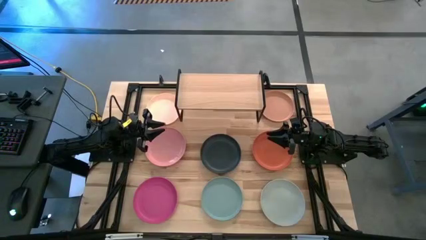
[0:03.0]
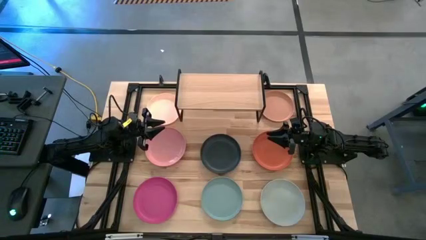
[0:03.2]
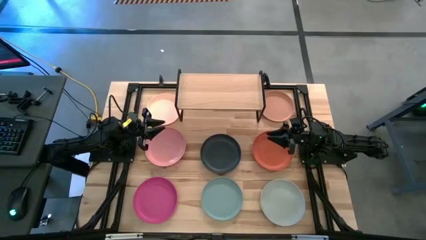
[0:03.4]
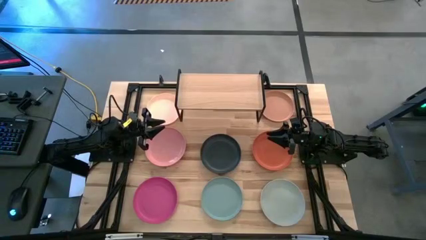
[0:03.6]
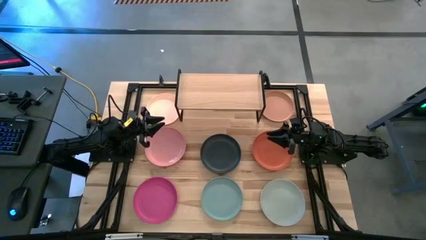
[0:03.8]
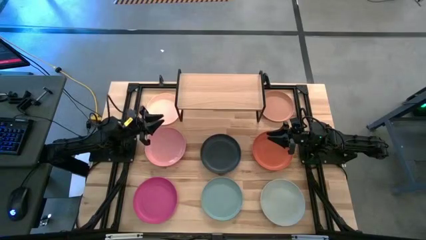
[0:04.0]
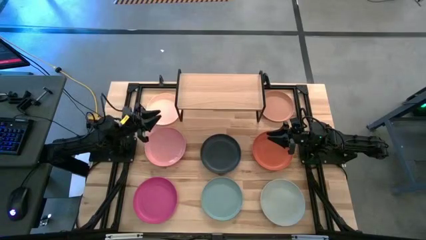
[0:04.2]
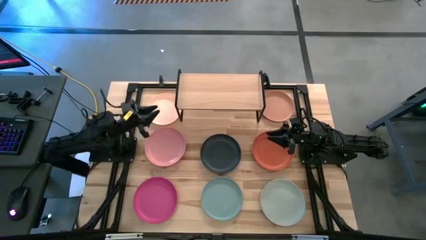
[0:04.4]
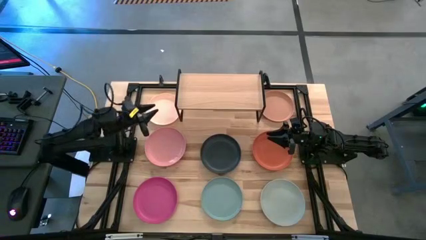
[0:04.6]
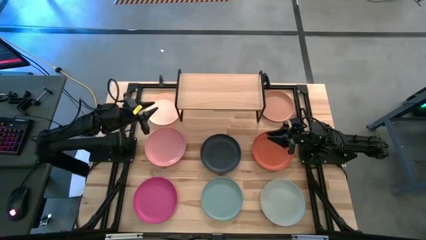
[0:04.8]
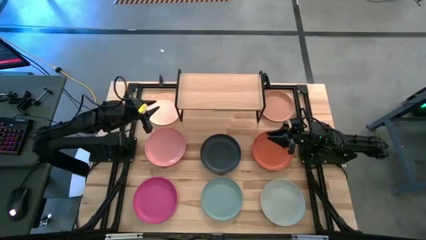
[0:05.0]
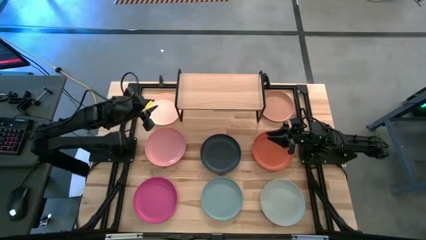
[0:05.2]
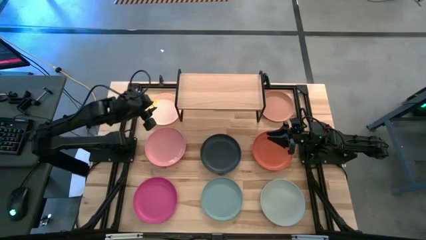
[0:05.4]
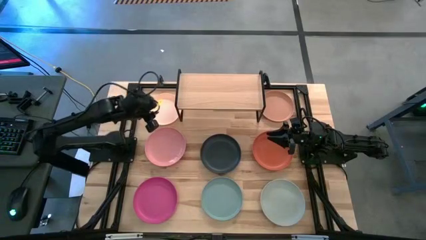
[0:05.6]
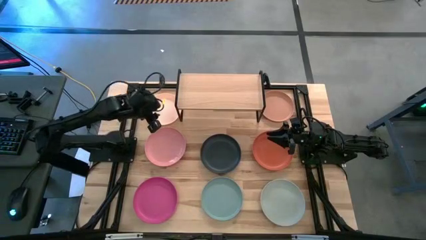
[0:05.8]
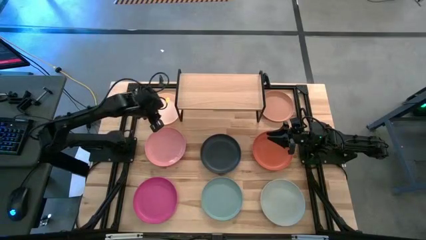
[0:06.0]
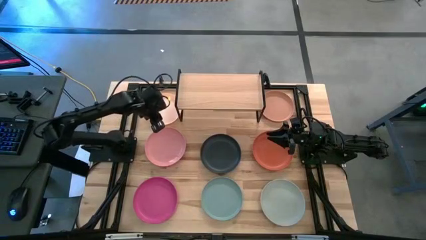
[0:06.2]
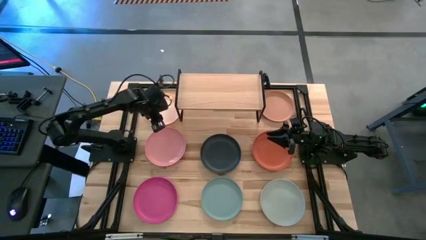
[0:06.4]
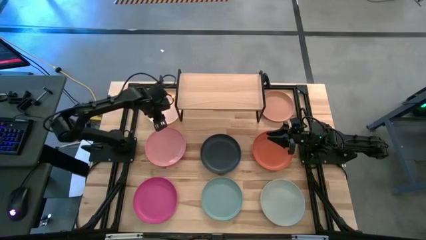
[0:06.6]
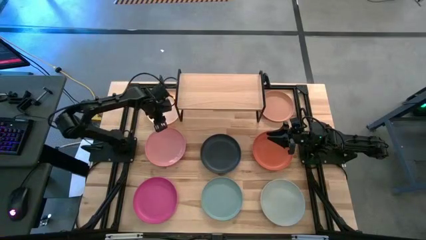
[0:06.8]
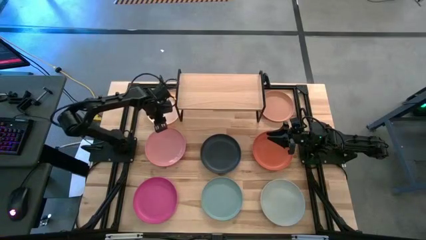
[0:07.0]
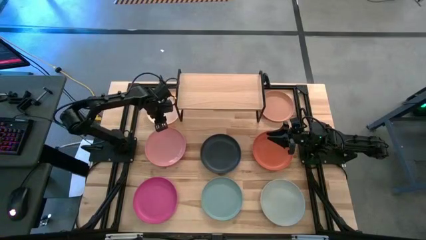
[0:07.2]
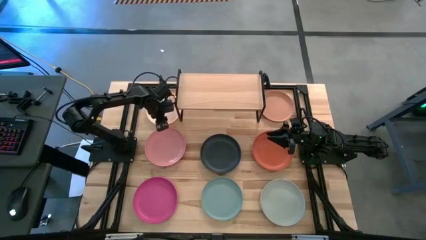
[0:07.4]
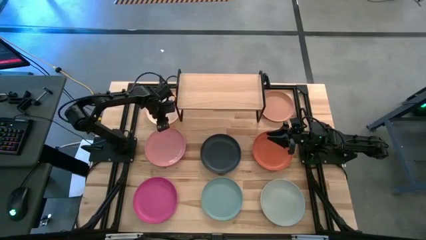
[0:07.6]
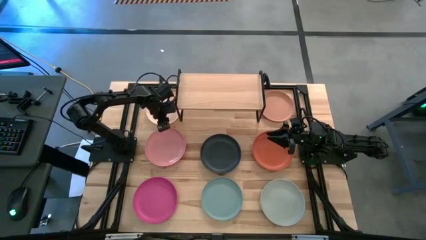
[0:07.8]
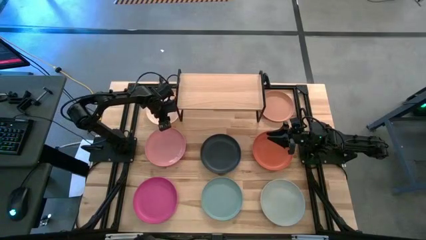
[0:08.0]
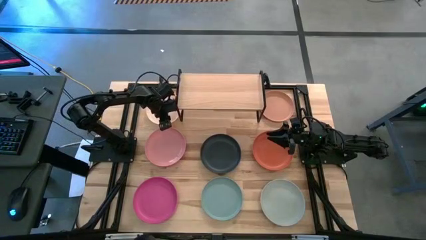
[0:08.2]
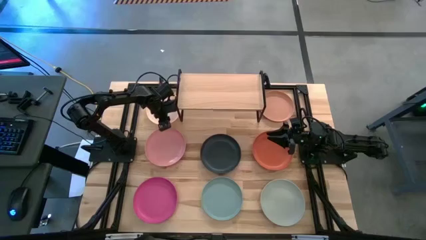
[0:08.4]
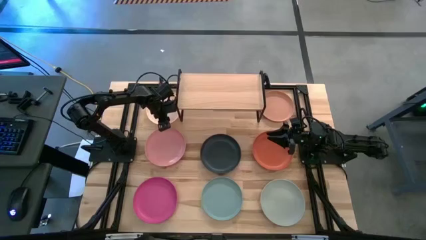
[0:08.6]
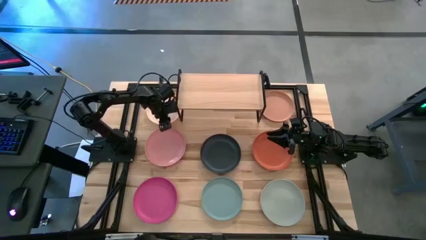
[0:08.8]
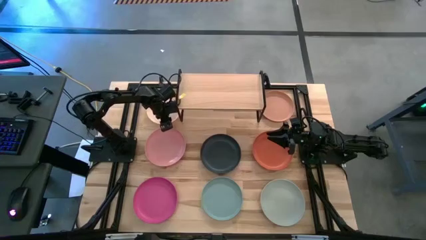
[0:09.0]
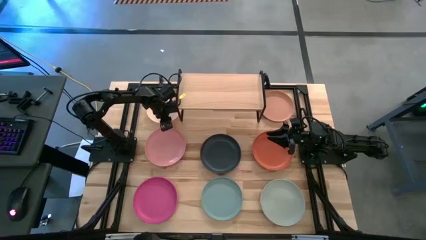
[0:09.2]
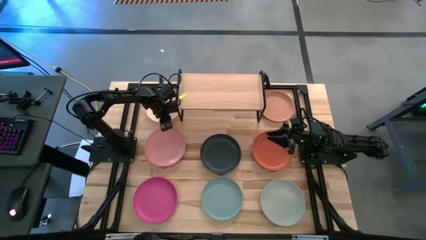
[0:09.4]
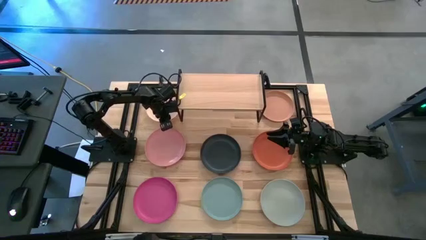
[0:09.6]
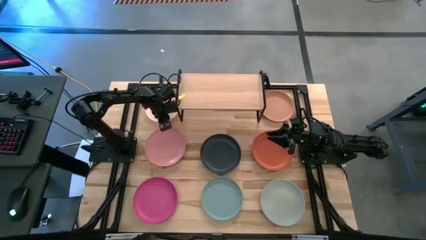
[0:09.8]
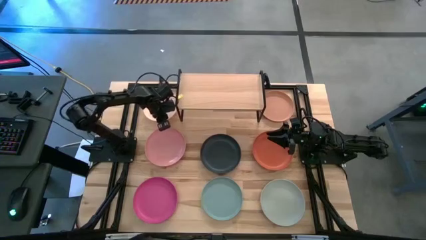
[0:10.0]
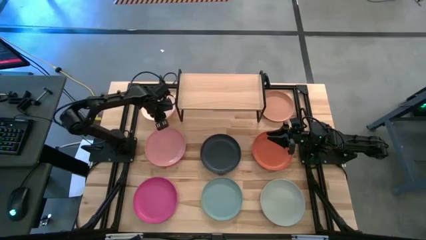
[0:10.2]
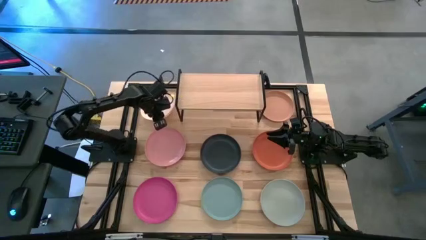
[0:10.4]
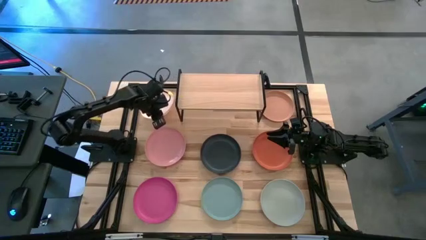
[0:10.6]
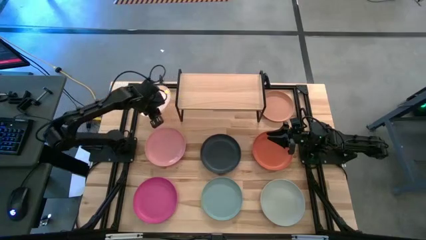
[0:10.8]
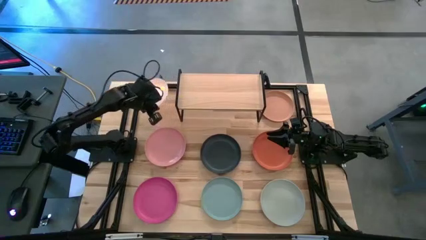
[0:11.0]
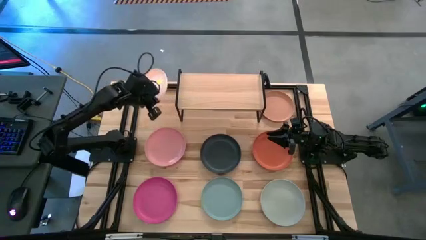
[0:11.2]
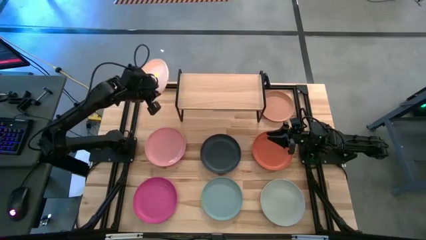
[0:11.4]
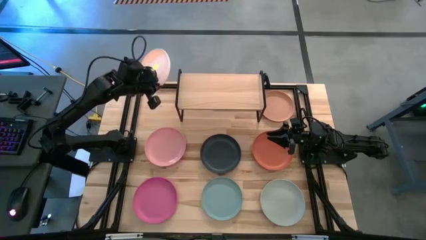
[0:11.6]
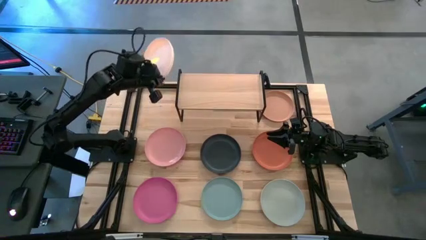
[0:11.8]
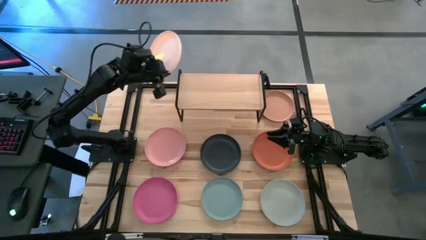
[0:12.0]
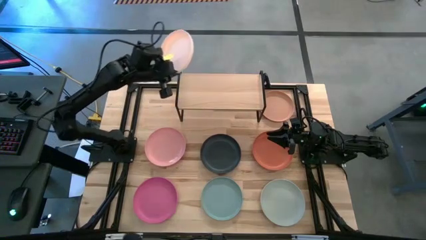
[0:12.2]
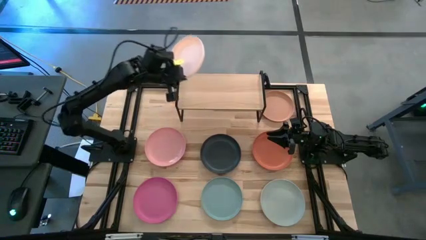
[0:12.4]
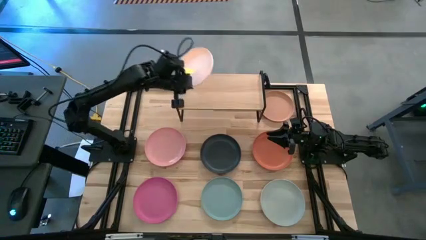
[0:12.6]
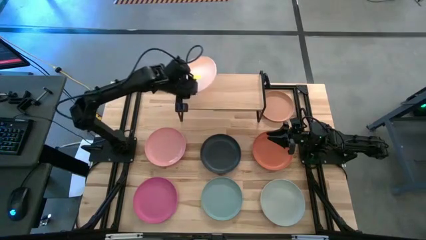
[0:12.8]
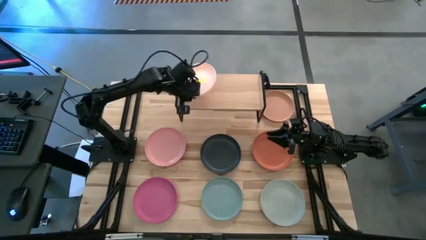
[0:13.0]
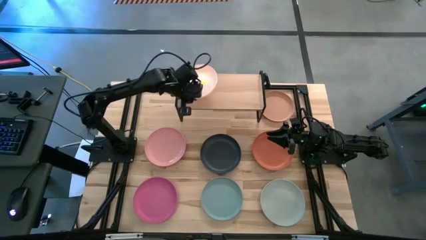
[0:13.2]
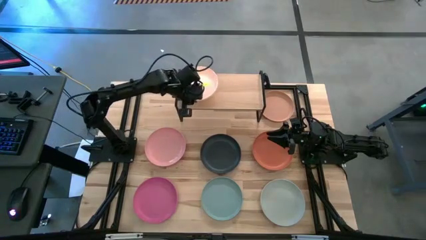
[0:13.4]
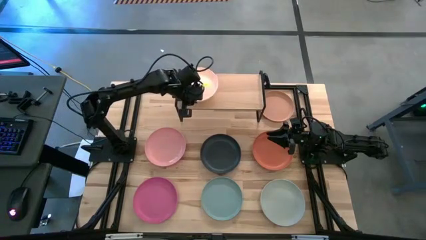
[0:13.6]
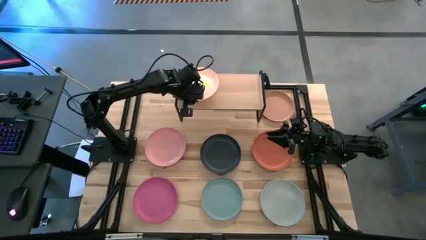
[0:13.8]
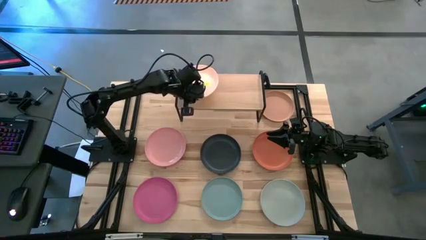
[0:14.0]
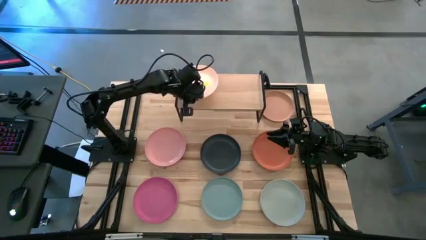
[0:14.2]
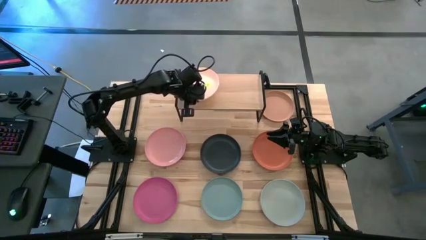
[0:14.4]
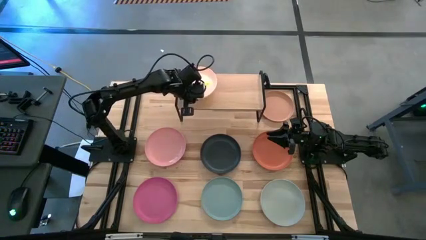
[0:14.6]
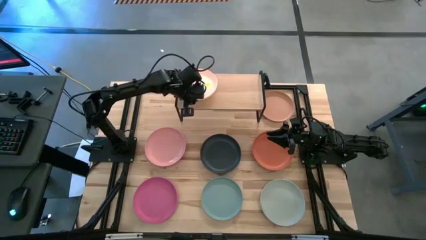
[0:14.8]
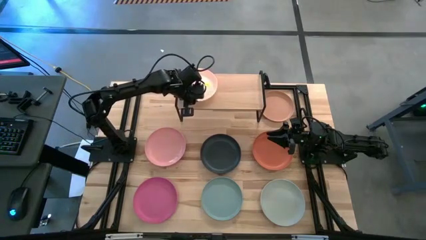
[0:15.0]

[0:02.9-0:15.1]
Task: Place and stack plates onto a shelf
Put the light orange plate on the shelf

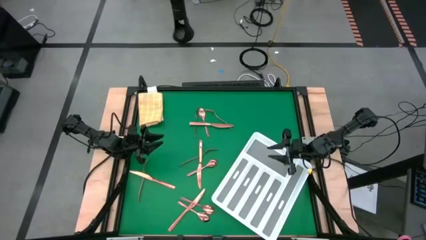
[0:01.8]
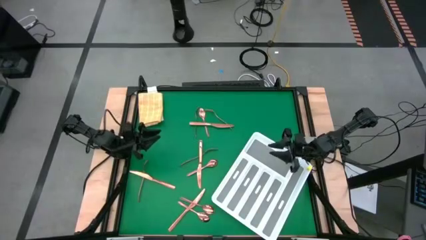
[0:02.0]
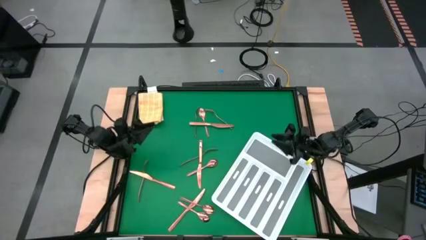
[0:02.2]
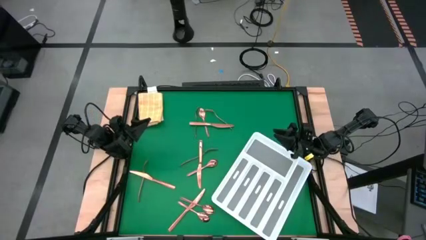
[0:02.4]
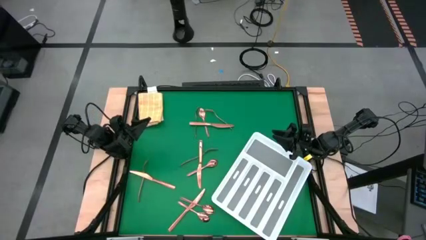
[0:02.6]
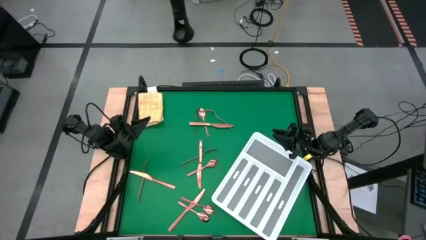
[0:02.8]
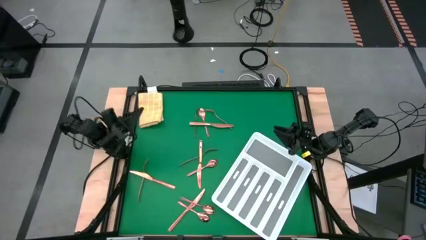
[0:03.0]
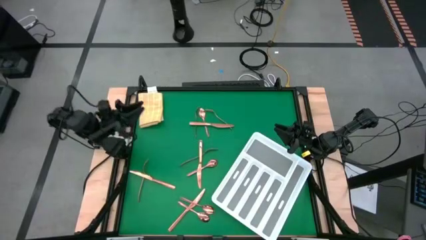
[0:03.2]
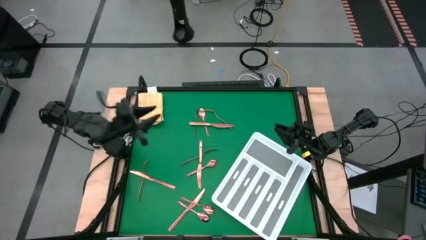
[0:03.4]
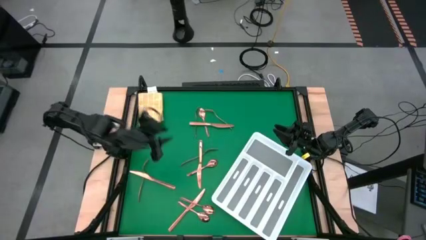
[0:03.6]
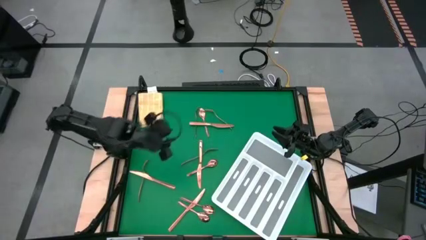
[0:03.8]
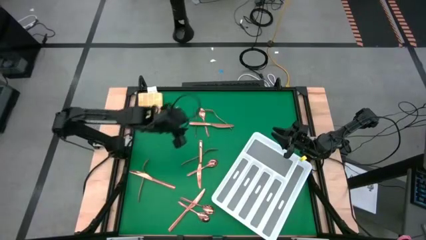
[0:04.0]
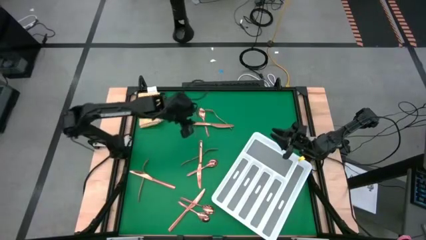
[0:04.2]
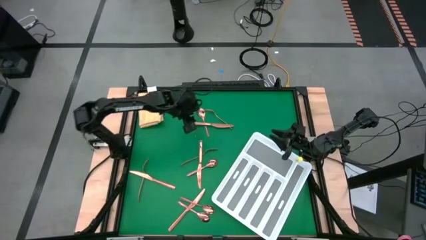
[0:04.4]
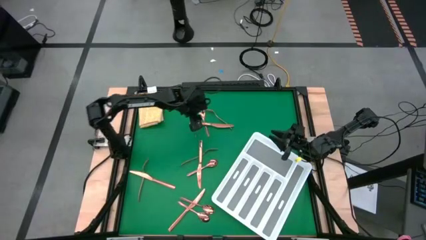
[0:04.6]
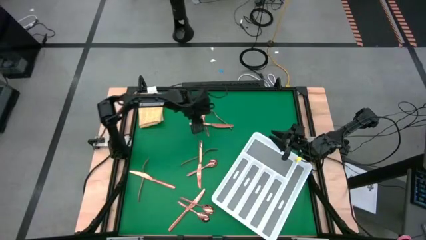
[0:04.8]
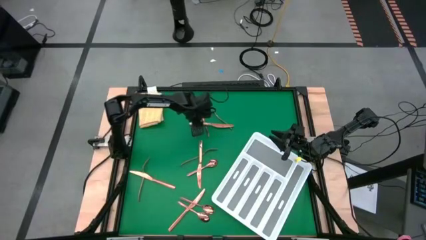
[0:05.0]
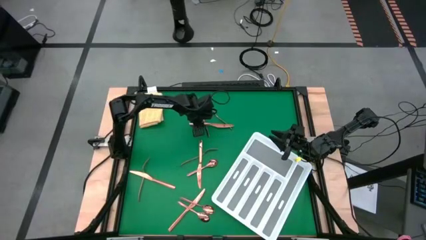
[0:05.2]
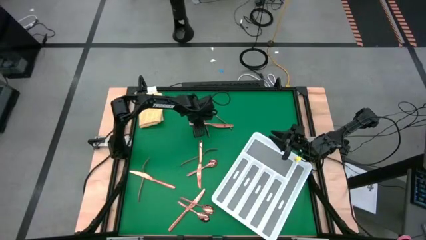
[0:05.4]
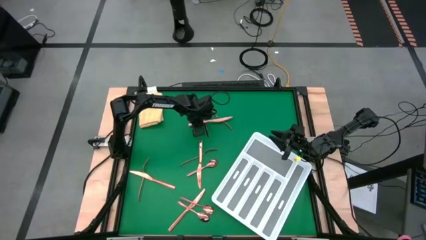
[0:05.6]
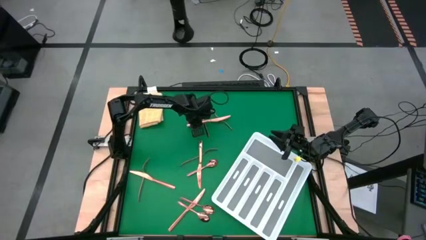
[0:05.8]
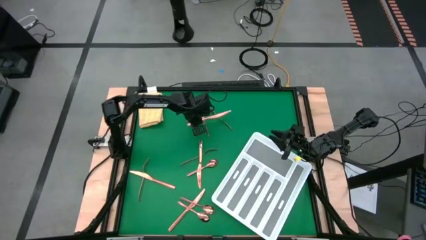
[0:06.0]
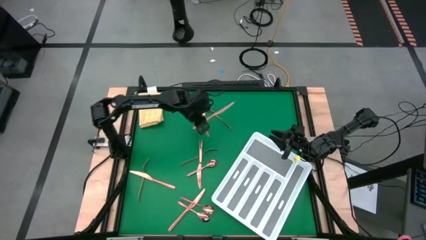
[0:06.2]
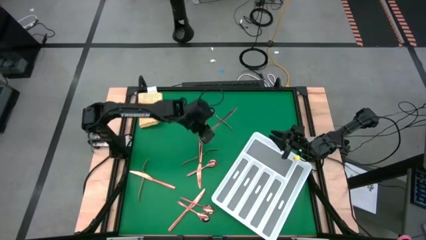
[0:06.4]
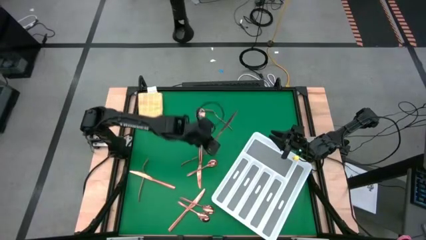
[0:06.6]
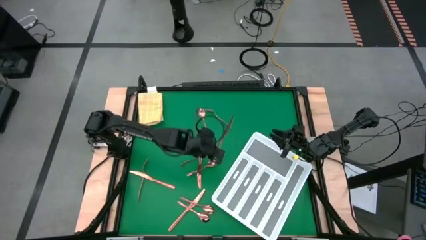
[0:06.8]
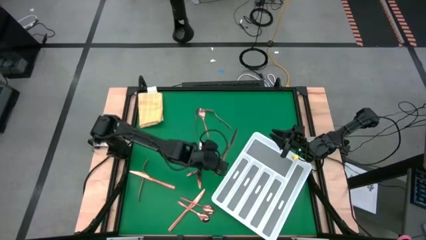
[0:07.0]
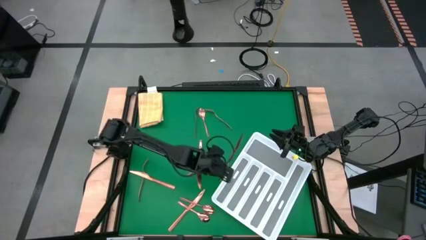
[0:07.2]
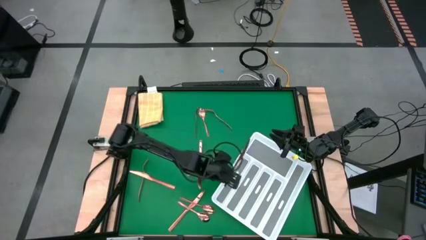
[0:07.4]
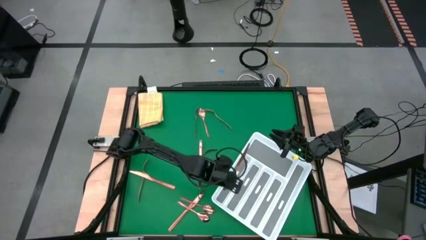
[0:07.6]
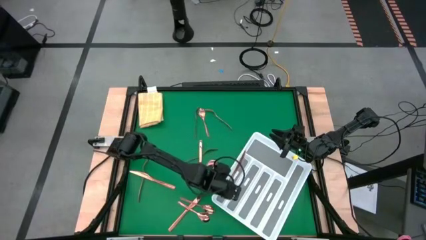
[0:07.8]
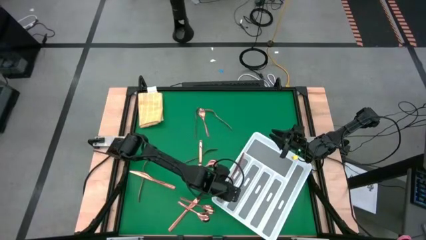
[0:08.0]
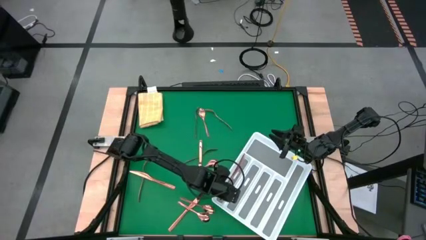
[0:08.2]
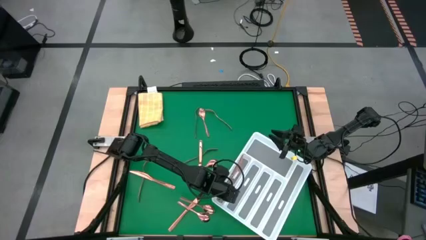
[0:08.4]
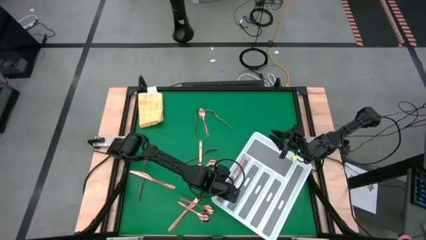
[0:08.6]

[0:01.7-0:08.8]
Task: Sort silverware
Put the gold table knife into the white cutlery tray
